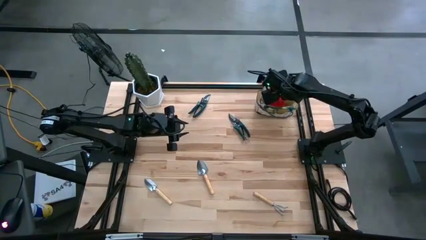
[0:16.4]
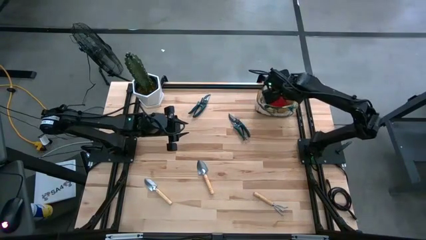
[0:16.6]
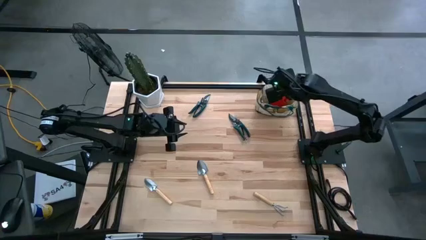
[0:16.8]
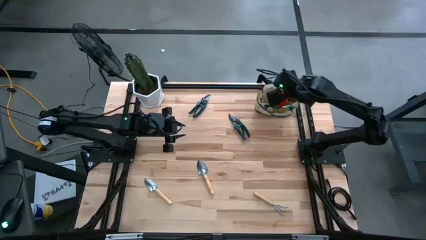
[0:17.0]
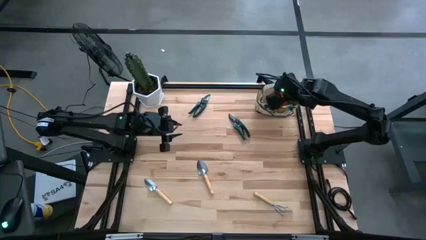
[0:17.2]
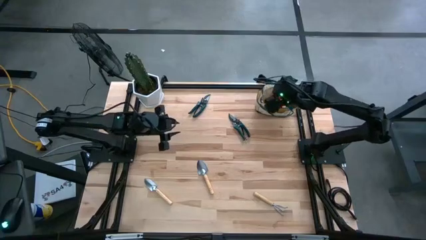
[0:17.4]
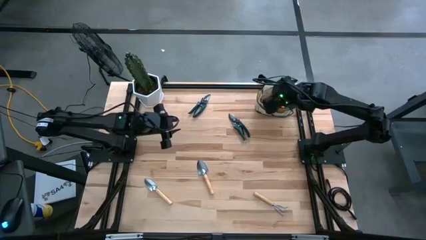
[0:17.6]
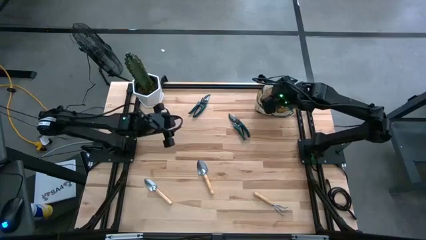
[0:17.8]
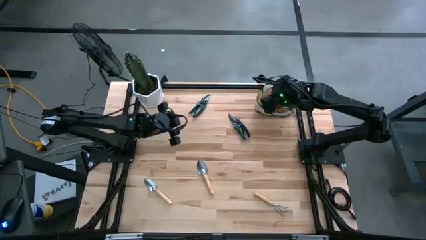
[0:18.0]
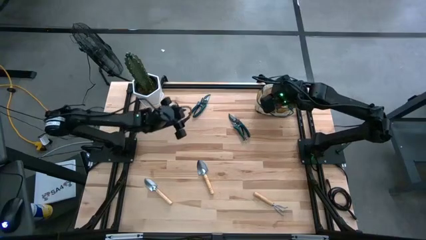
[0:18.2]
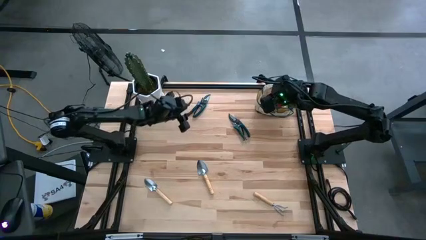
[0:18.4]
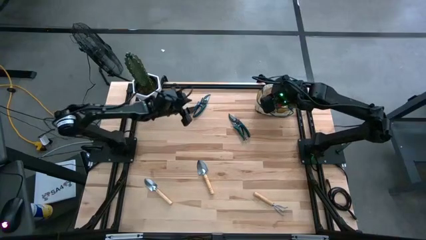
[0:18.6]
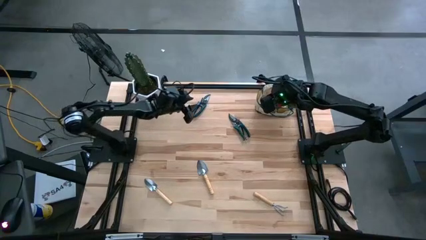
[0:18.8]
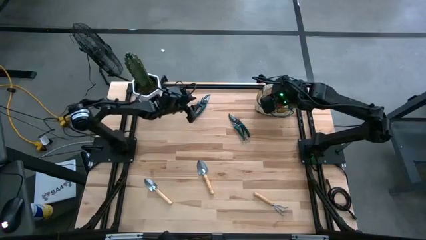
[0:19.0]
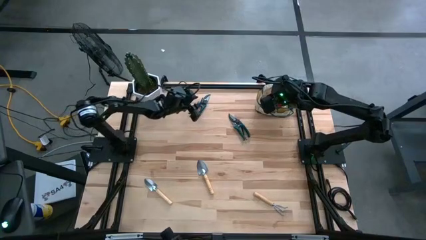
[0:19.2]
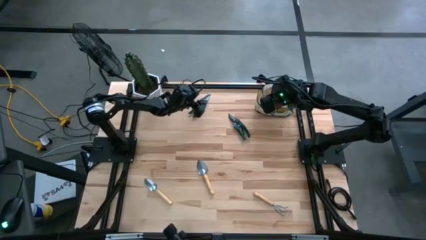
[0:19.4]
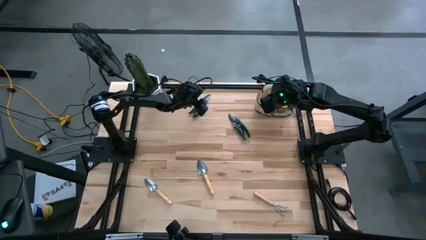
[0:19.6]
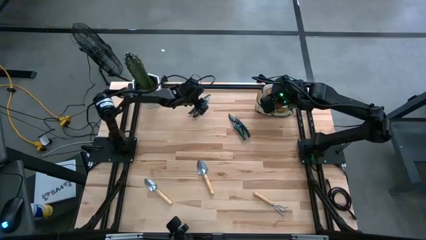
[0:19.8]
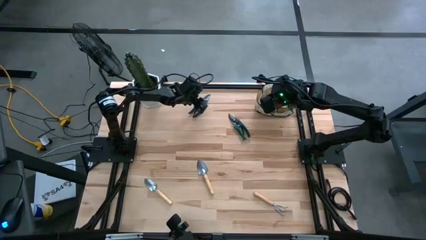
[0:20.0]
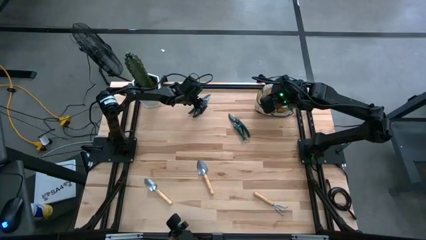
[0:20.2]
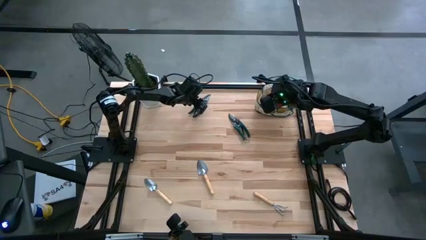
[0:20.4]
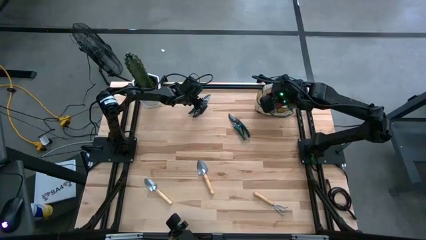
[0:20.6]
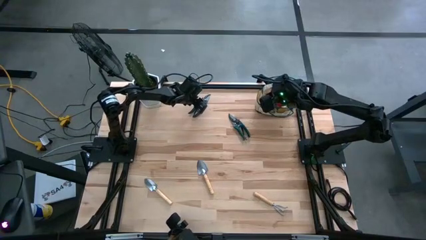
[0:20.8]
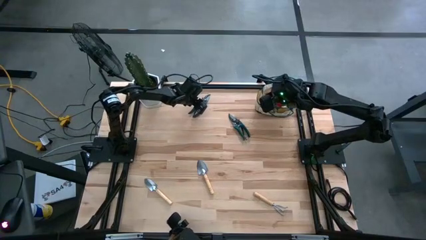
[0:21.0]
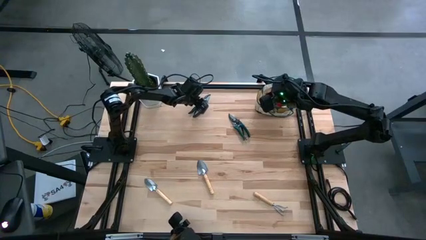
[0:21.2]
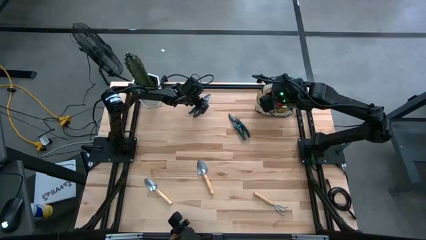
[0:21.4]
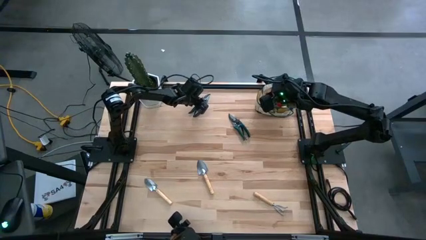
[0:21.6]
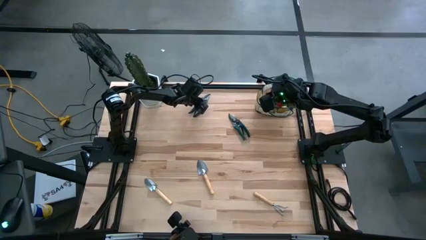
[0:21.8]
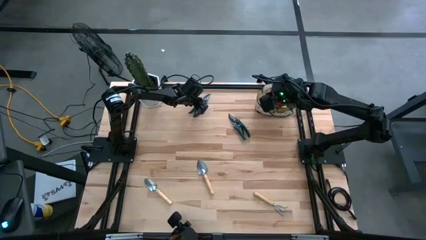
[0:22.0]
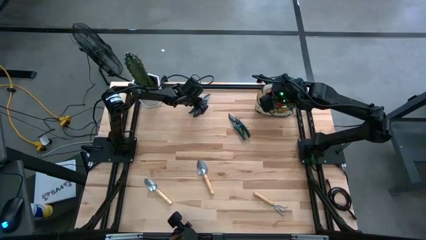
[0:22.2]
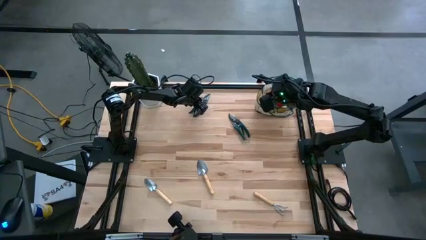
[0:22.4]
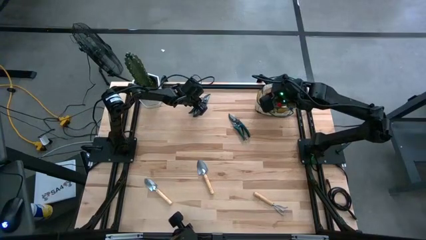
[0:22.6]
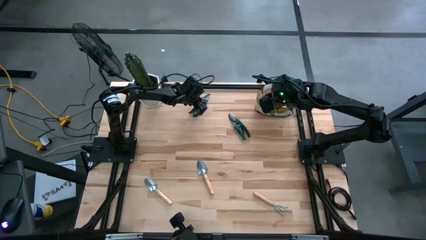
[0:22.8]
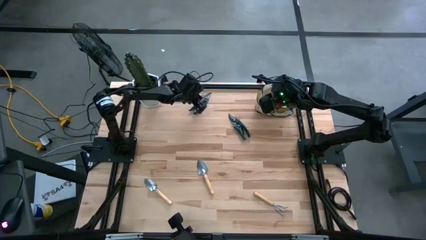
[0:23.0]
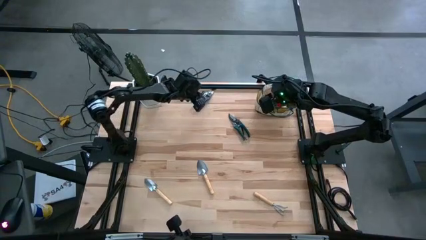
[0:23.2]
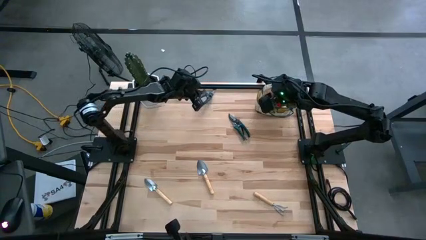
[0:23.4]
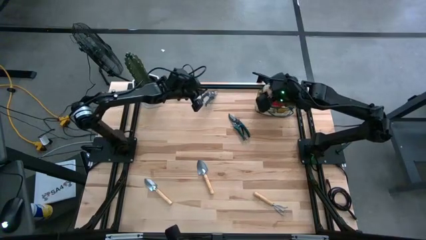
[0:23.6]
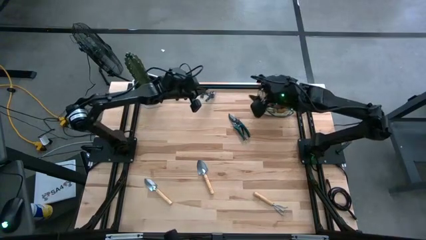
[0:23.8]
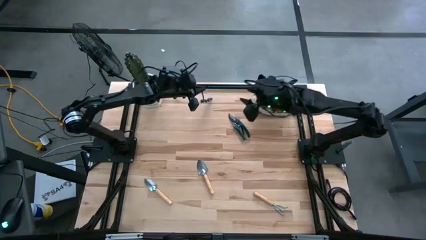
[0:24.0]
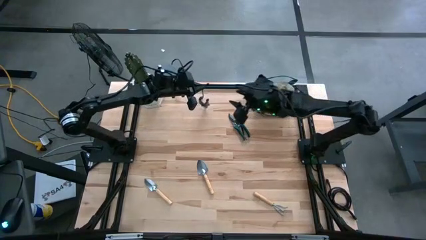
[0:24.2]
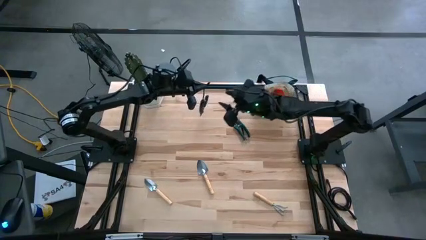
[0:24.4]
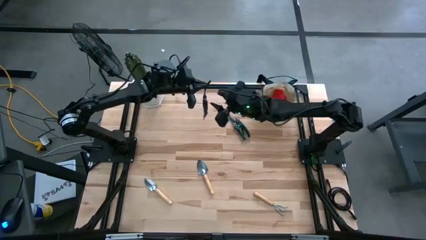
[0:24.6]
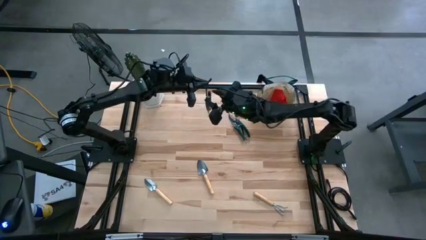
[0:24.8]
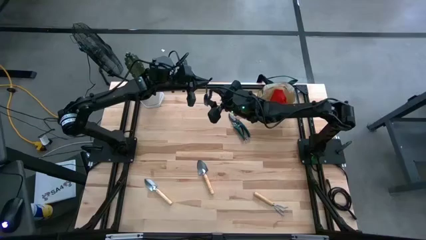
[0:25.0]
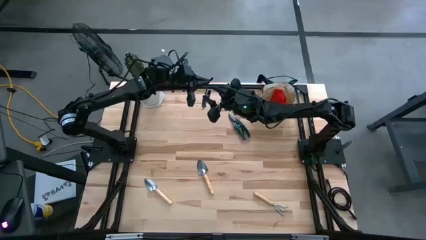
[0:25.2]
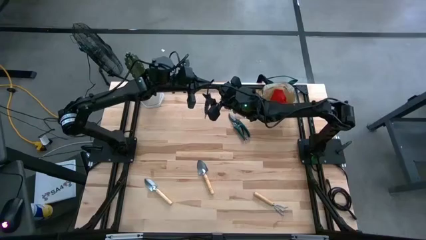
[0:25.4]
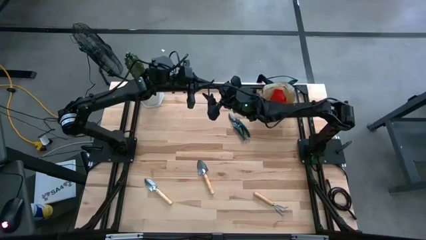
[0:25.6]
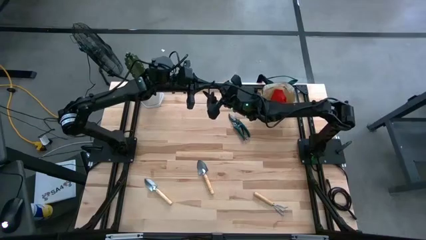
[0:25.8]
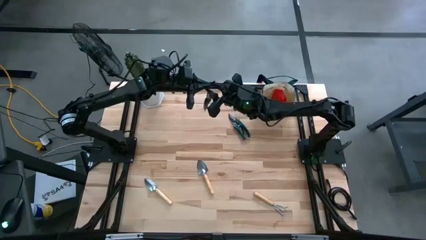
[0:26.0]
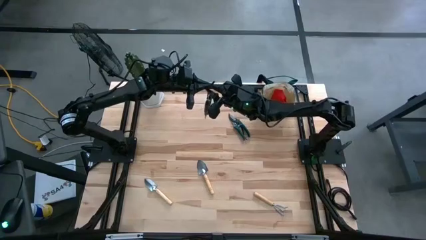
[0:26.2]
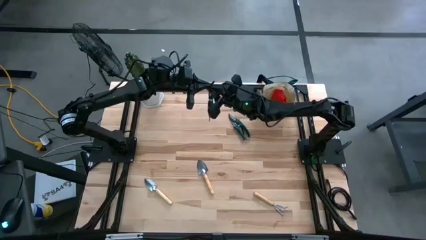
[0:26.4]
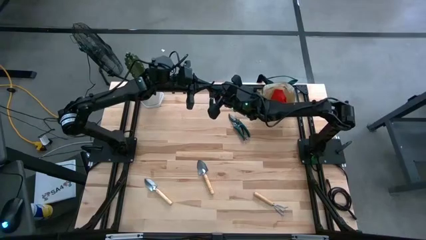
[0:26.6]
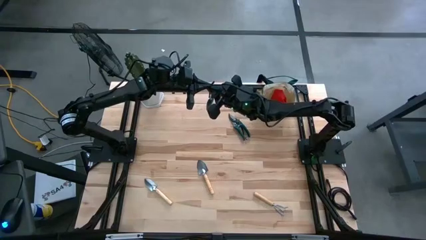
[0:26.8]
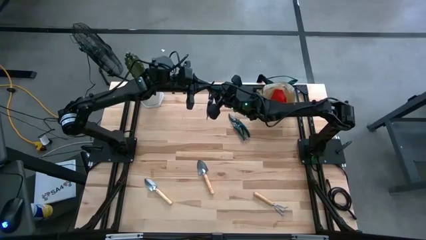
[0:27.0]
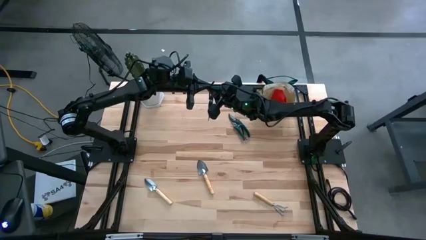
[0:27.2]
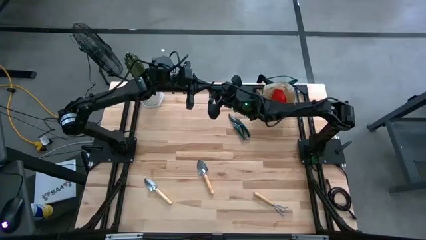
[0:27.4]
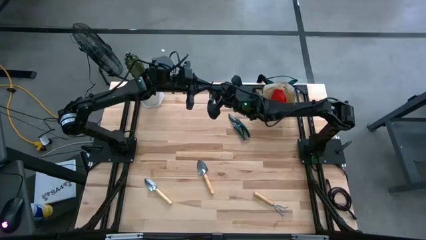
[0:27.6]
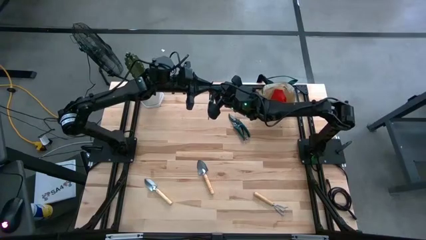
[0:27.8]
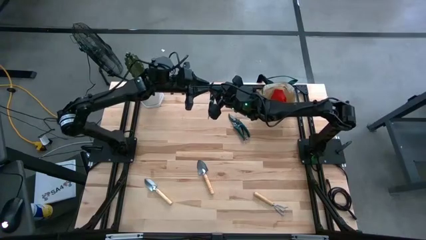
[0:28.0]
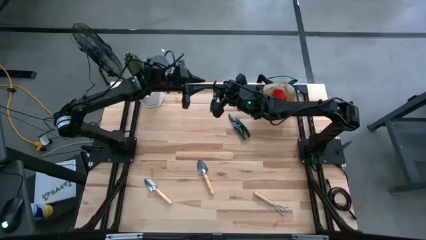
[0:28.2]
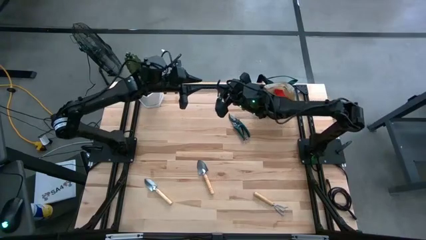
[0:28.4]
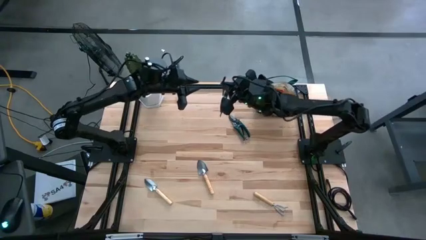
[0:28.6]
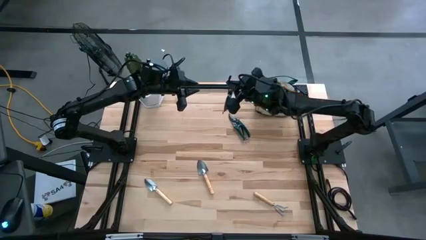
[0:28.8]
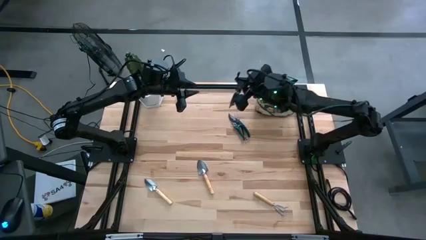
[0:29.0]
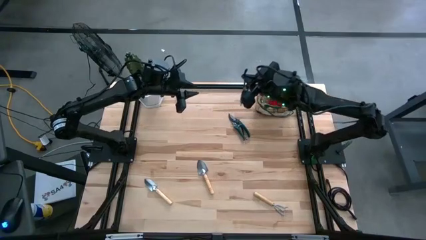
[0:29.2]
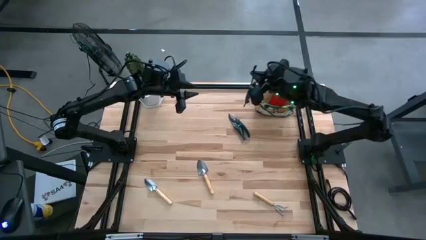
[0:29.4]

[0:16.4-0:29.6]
Task: Pick & Place Garden tools in Gardening bag
Put the left green shear scissor into the gardening bag
